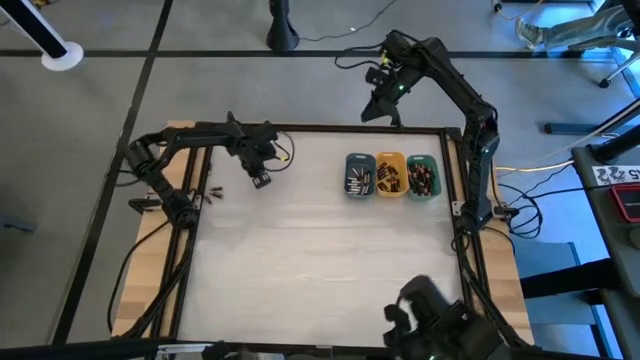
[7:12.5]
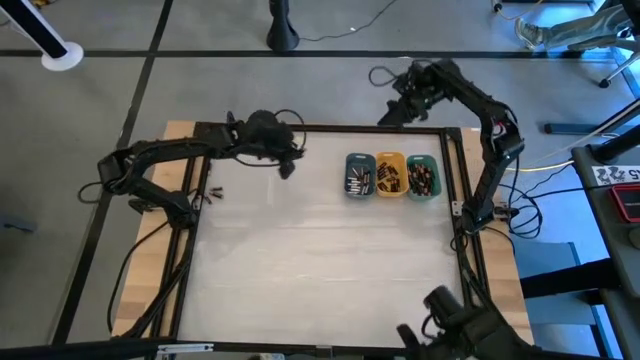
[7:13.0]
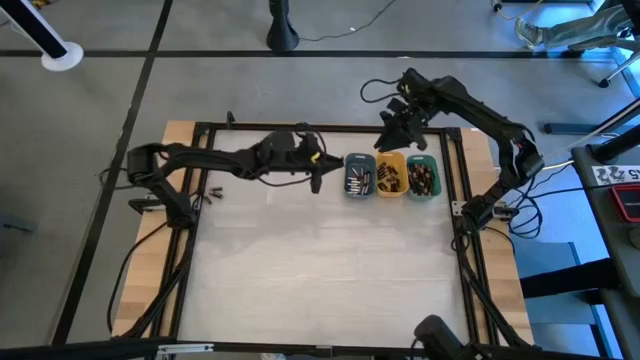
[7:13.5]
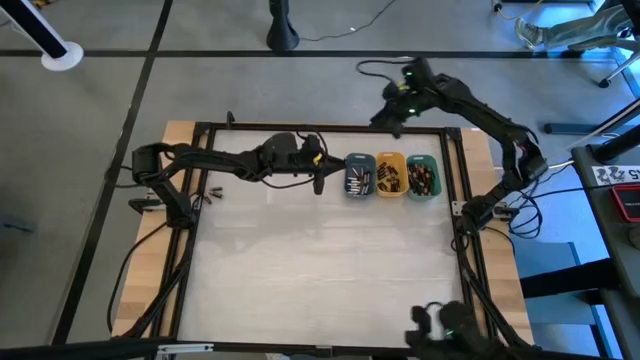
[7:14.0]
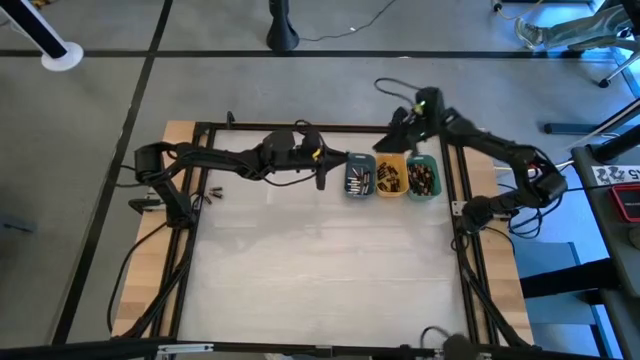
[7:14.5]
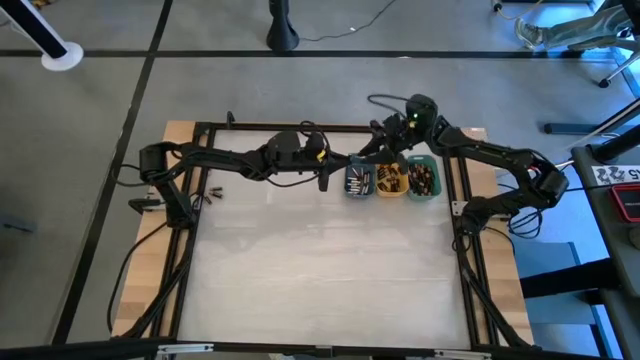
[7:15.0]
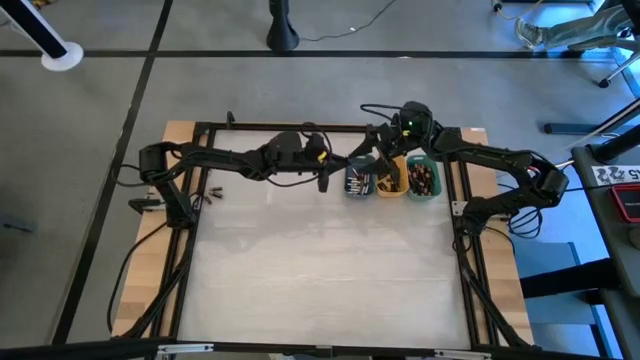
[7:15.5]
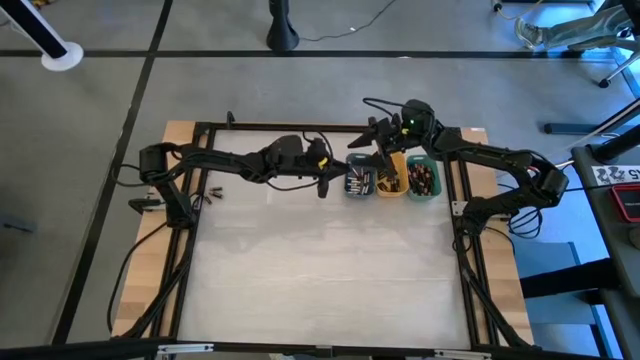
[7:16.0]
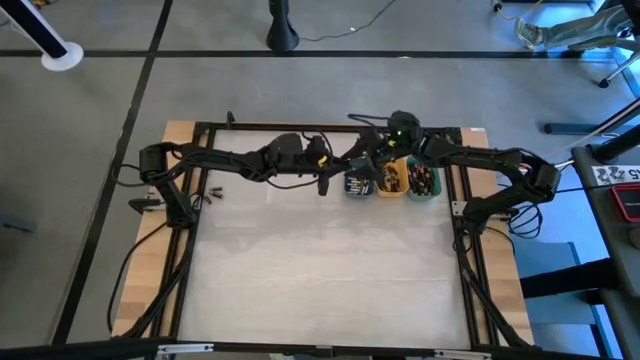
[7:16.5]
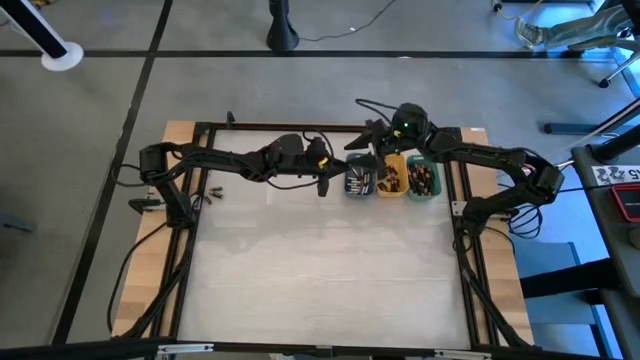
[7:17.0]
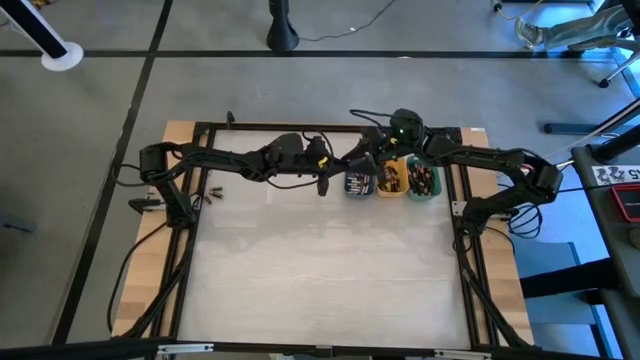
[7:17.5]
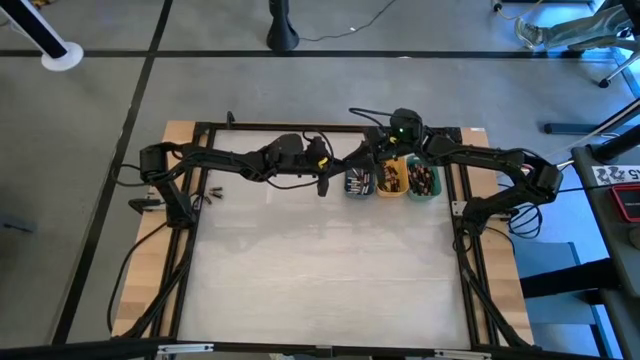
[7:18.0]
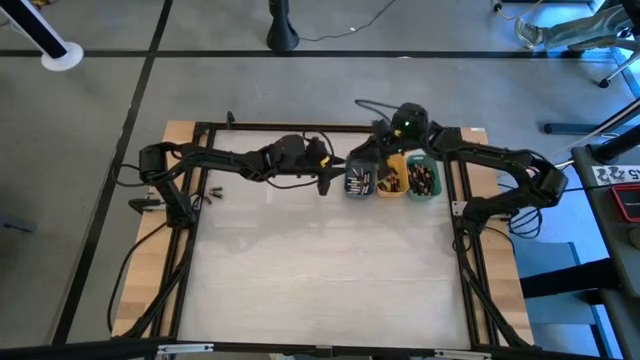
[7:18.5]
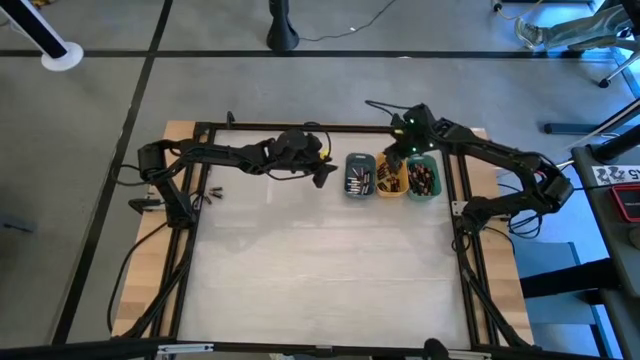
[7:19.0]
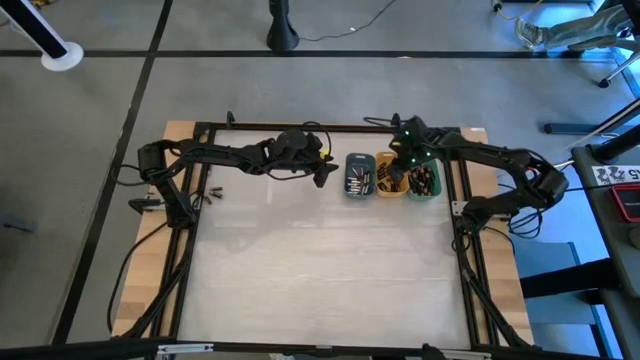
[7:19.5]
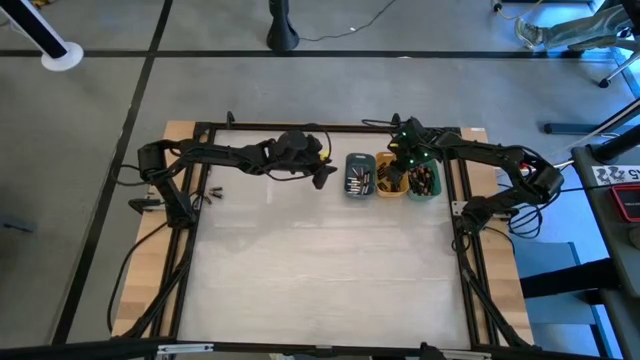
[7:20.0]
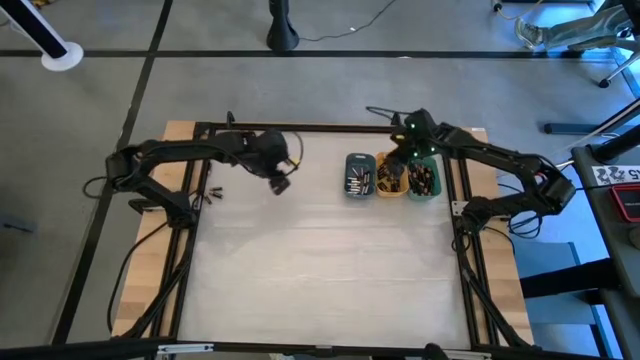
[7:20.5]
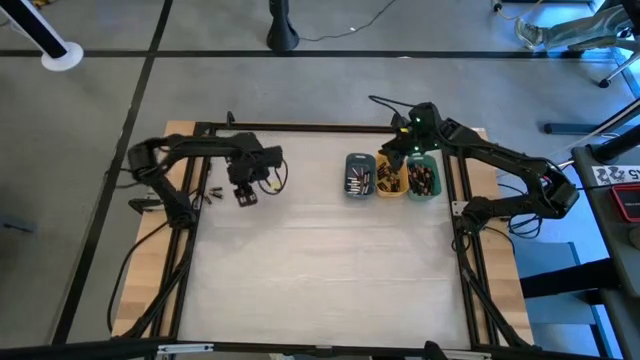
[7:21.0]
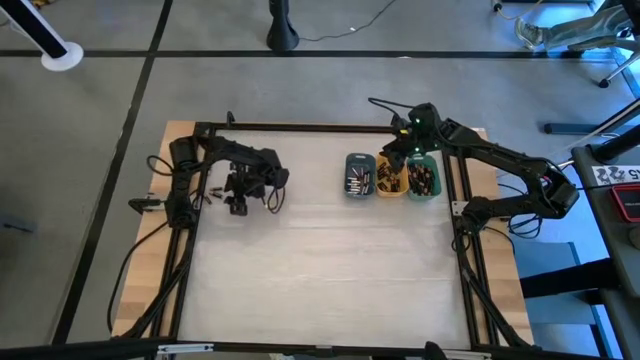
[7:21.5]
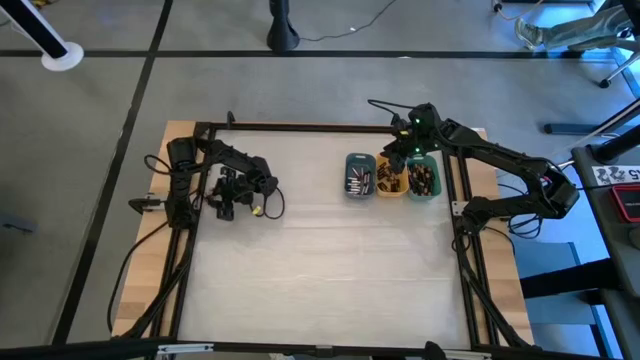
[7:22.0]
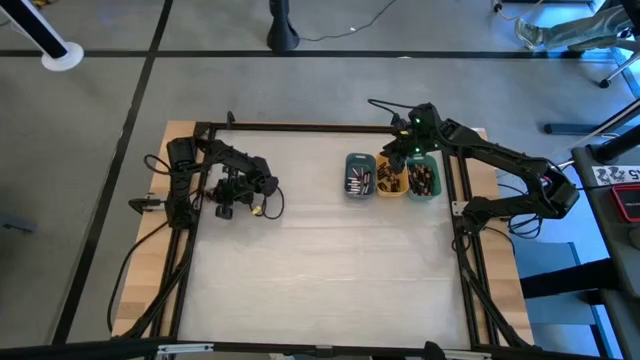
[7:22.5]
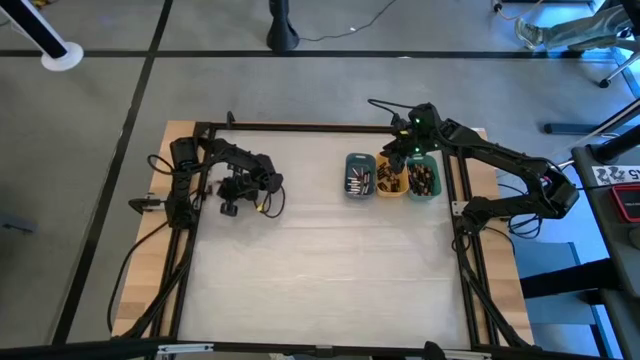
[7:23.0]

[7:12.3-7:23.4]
Task: Sort batteries
Put the black battery into the yellow bin

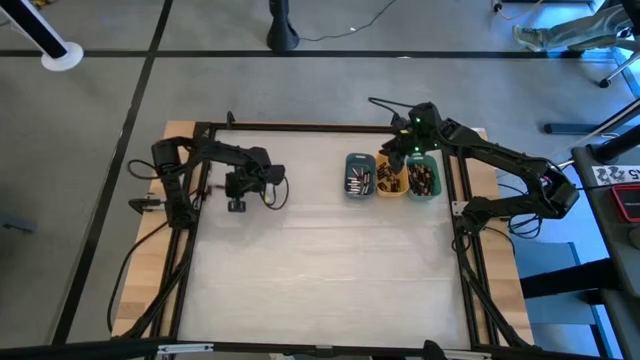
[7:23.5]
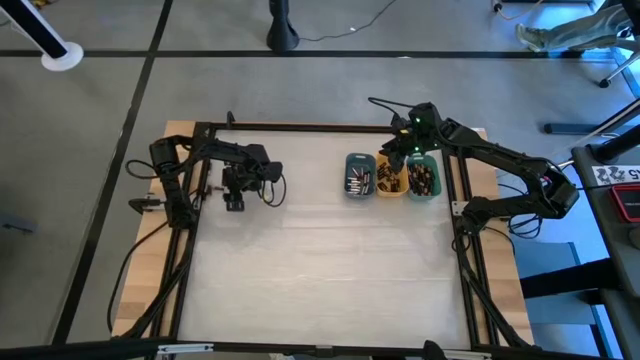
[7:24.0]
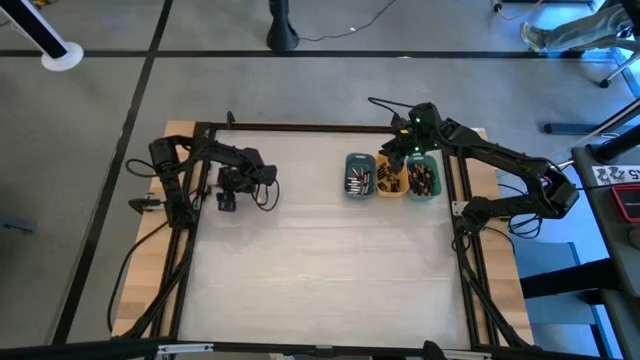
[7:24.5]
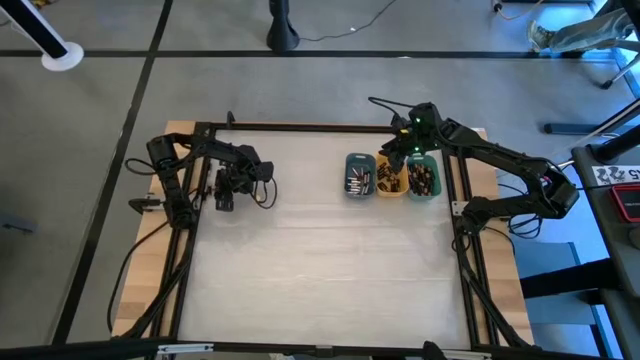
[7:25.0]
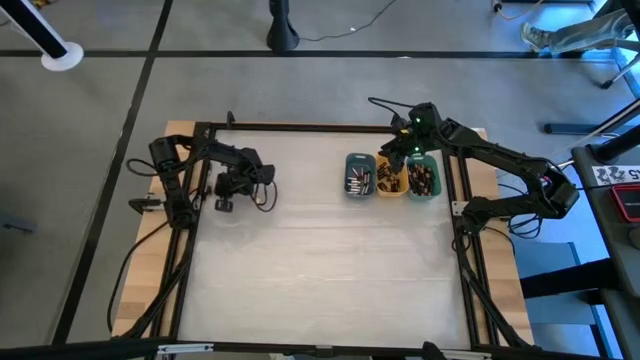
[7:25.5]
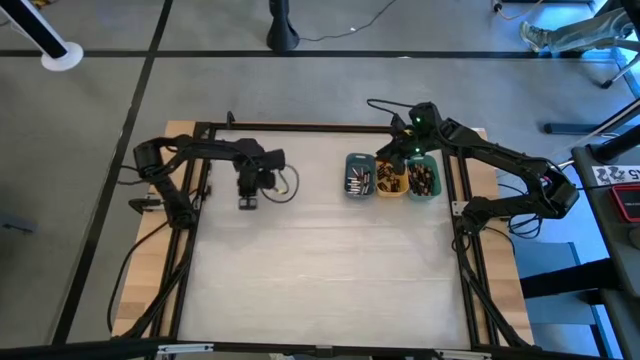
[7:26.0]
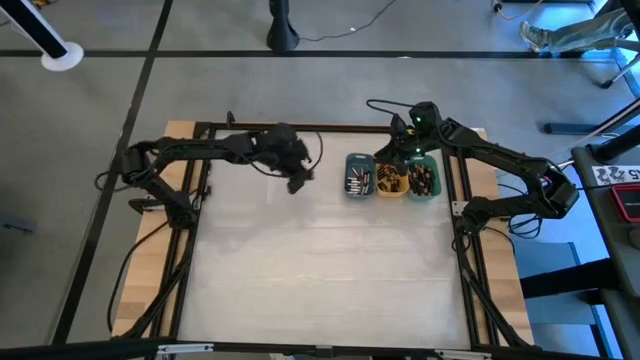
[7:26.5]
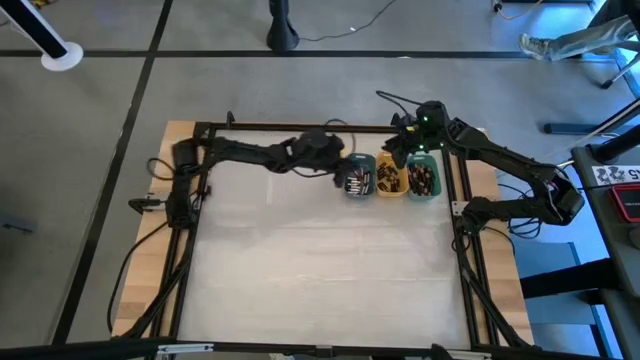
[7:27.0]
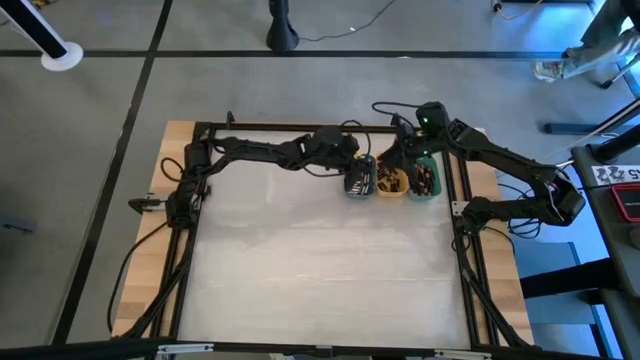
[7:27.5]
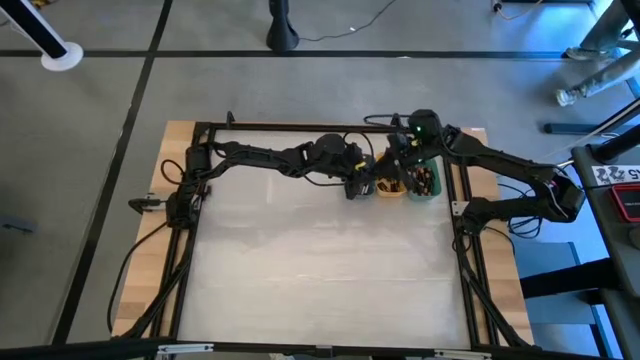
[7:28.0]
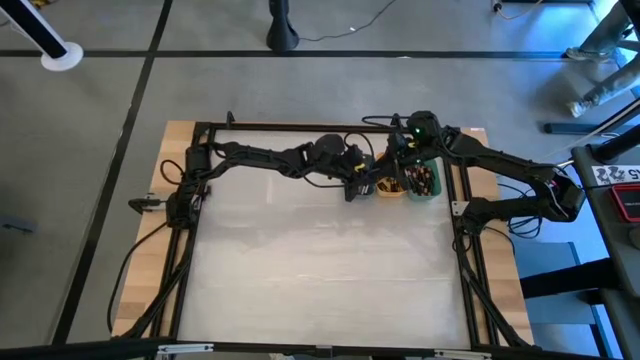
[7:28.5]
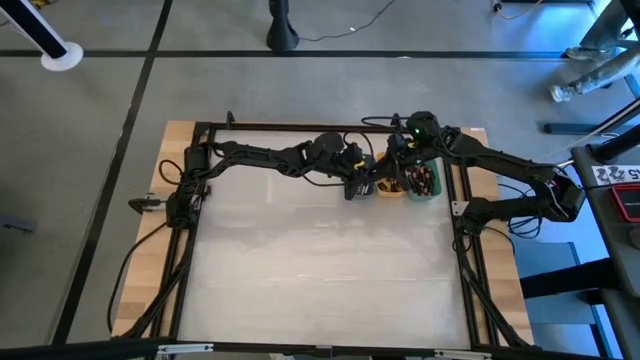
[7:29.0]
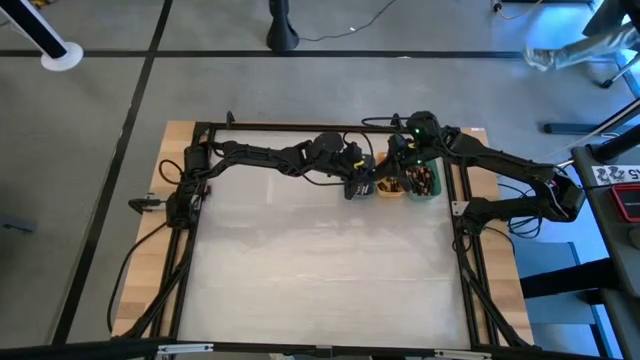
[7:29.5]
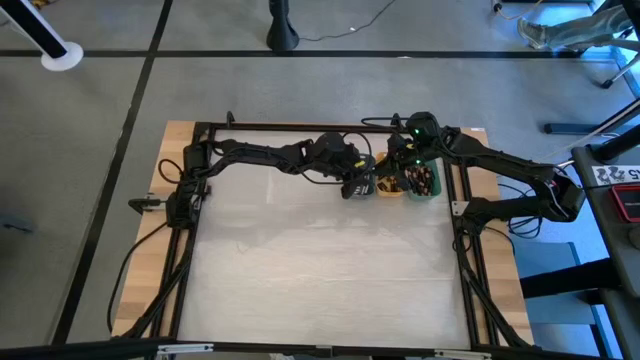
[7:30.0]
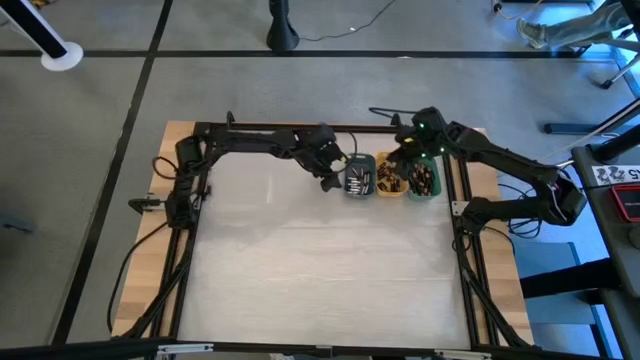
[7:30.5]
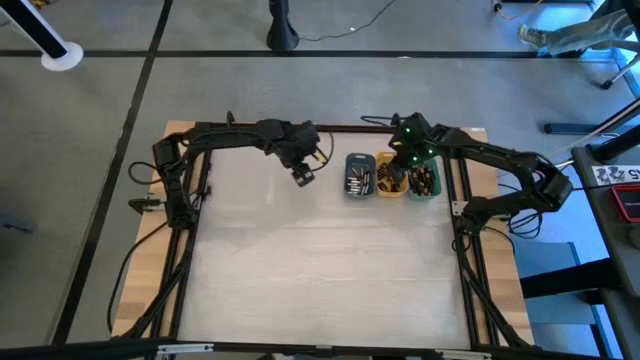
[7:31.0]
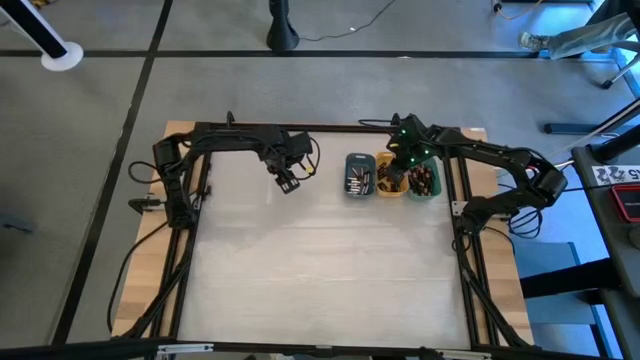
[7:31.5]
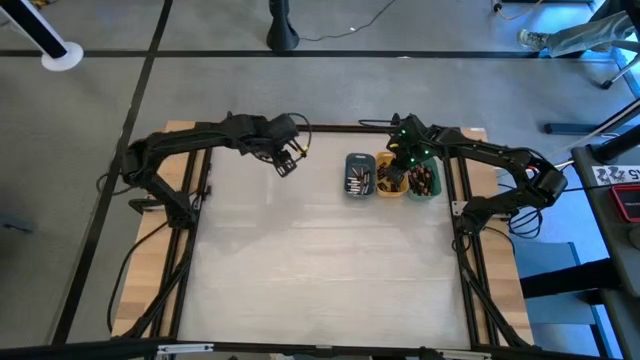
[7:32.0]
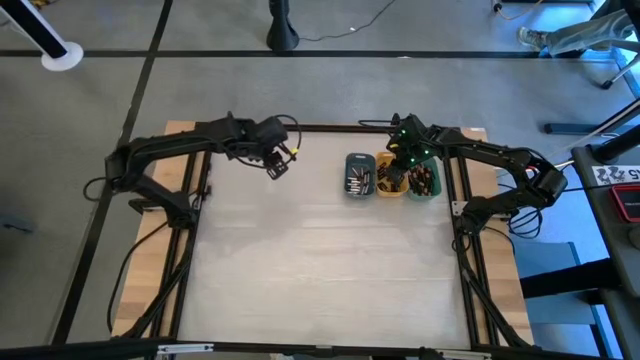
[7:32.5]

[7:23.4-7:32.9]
Put the black battery into the yellow bin

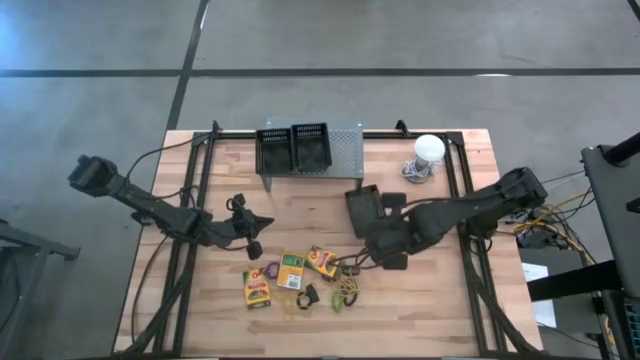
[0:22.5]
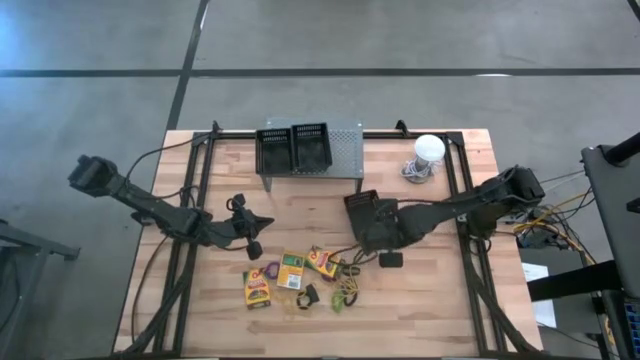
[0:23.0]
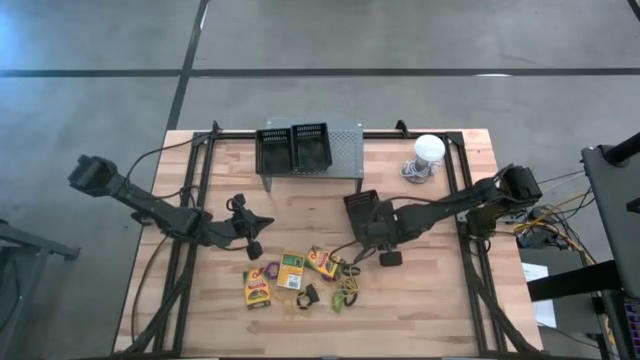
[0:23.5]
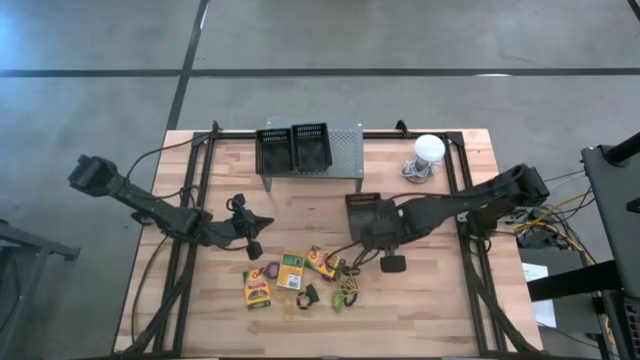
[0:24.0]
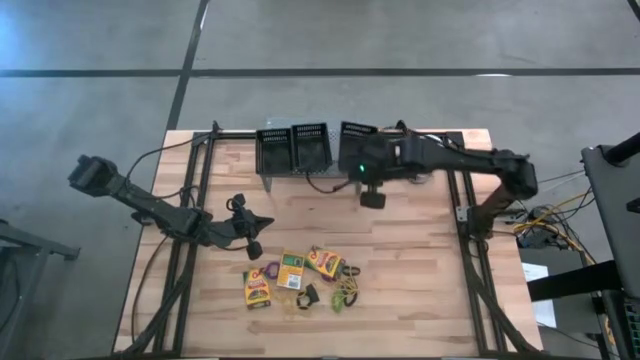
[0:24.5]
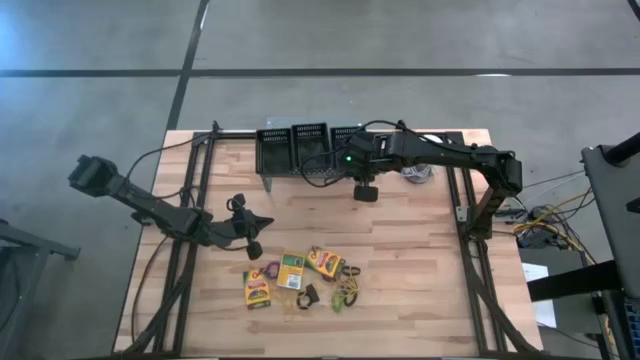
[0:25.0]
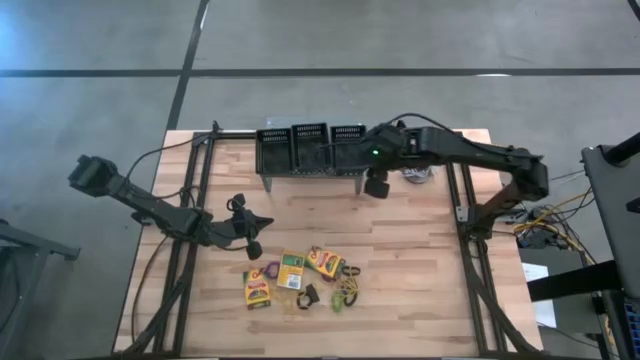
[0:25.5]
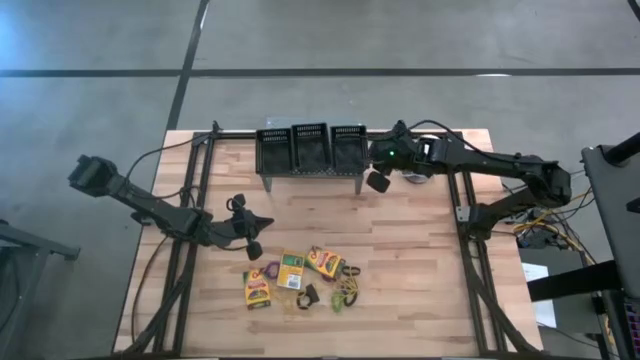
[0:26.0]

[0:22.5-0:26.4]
Task: Pick & Place Office Desk Supplies
Put the black basket
